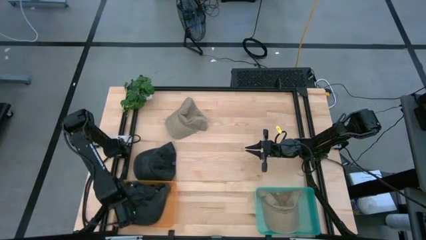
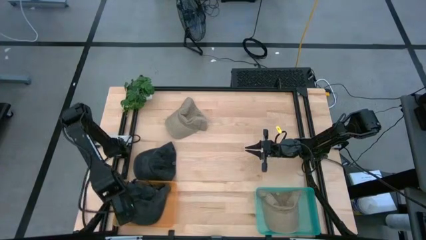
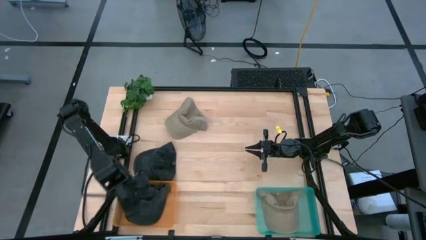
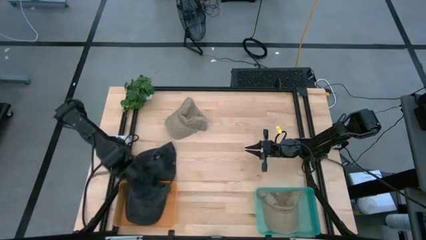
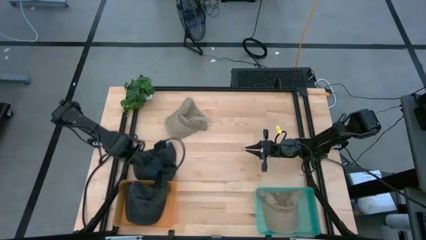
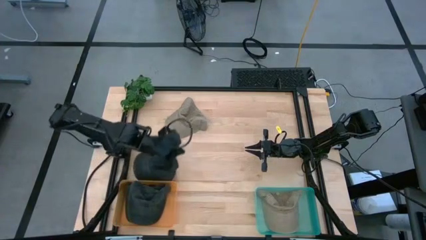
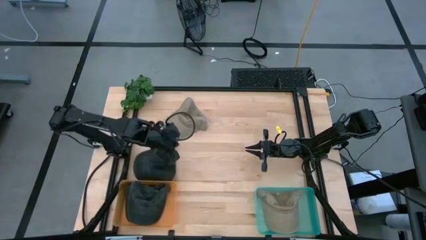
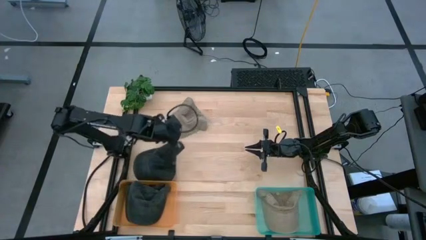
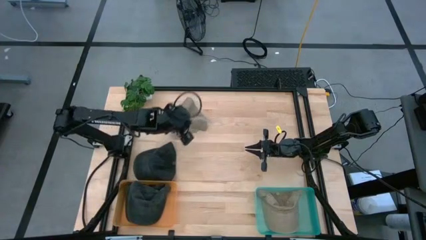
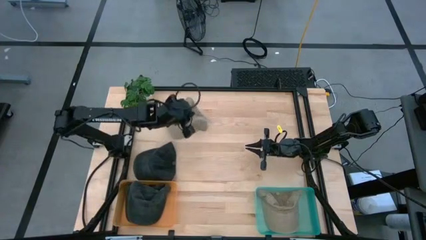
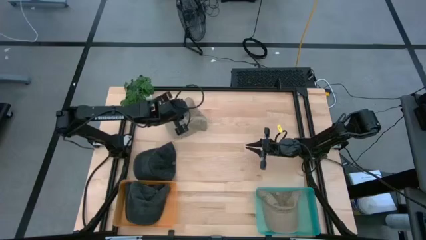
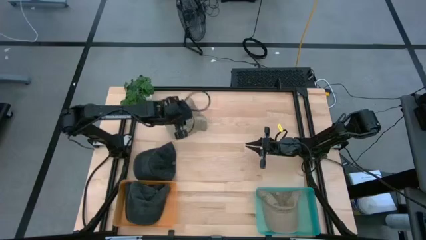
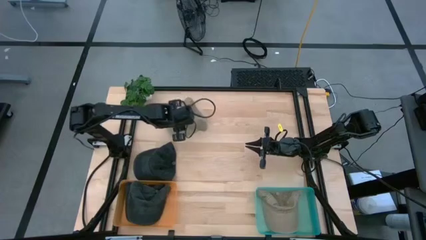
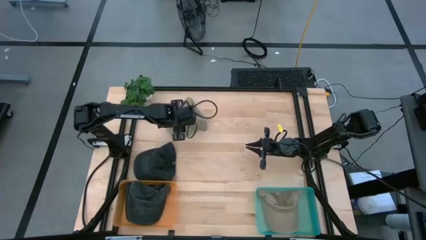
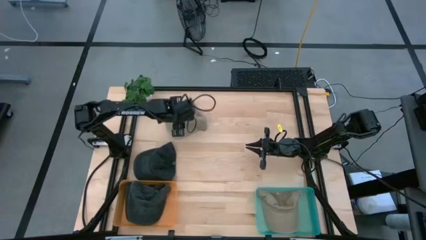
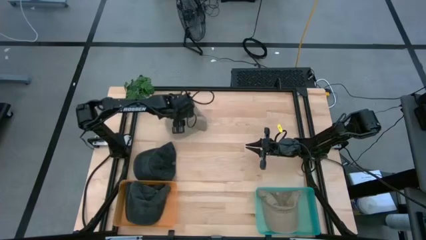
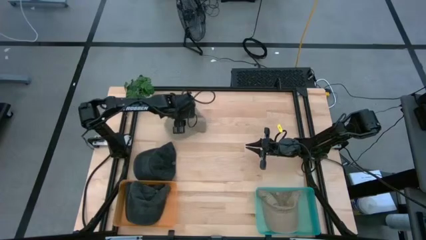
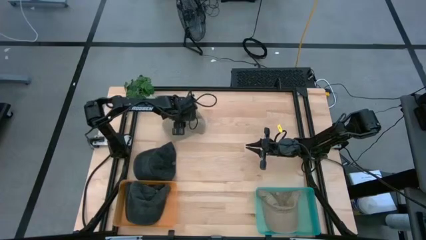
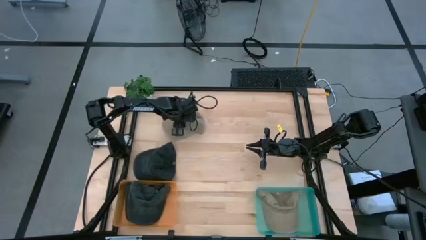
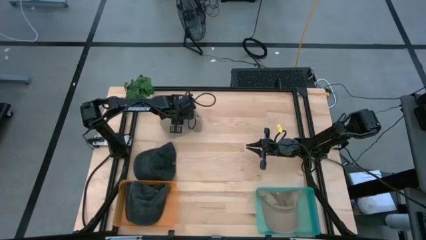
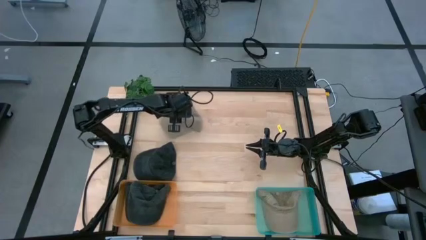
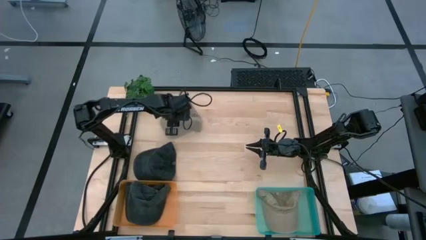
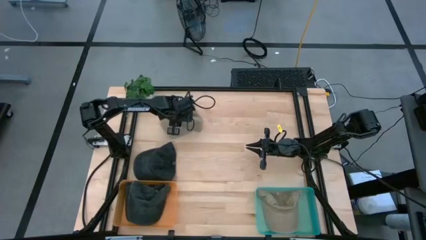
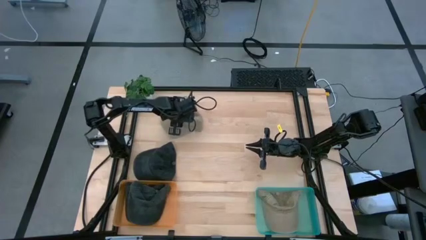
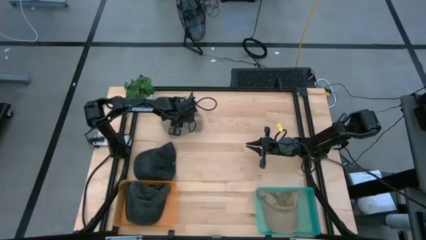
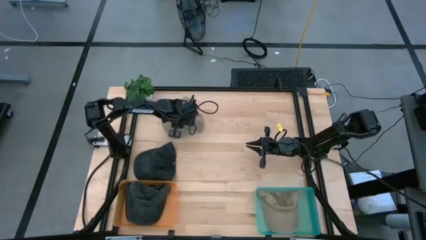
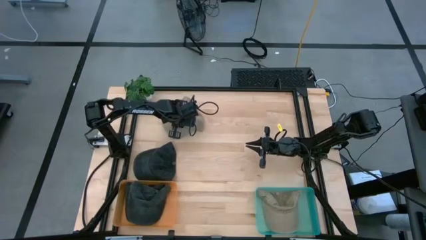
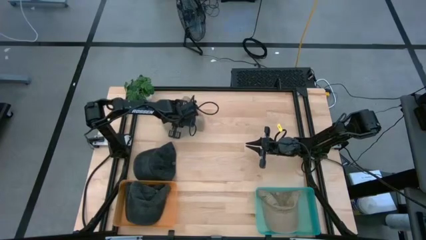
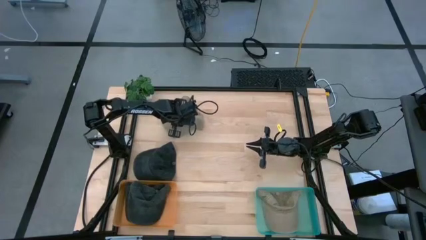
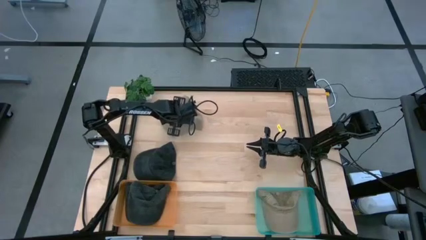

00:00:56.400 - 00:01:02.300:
Task: Pick & Place hat
Put the brown cap into the blue bin

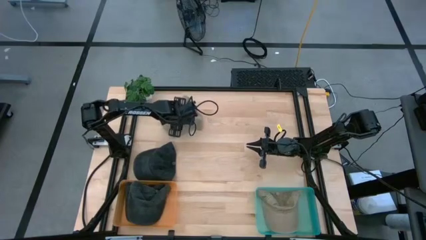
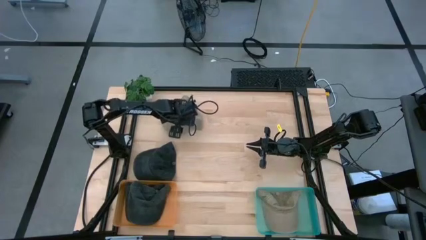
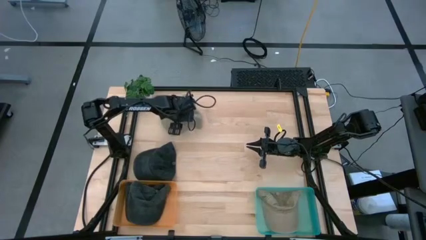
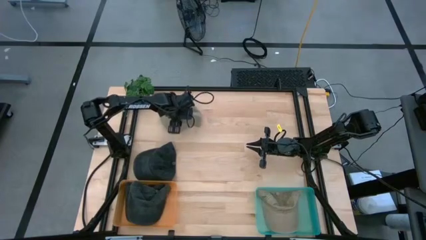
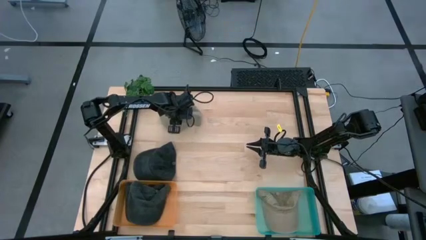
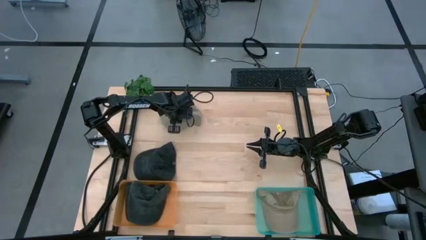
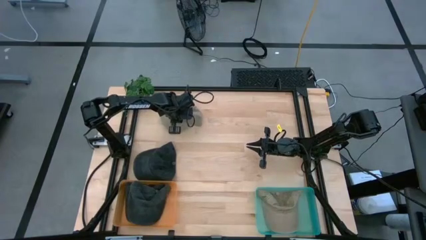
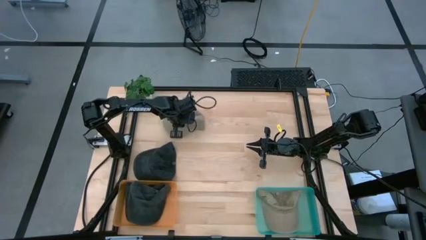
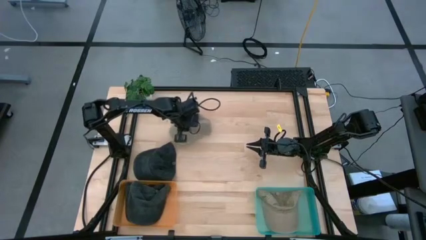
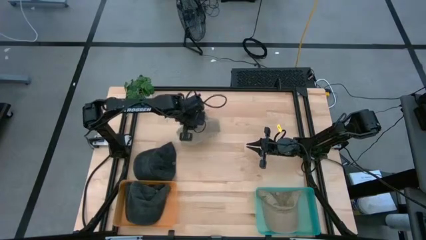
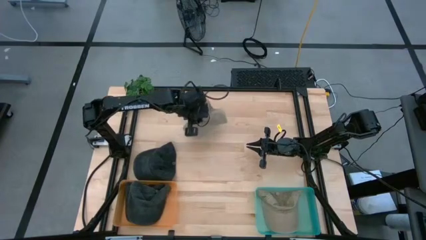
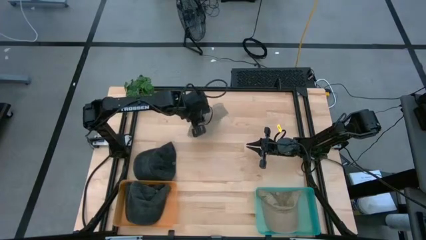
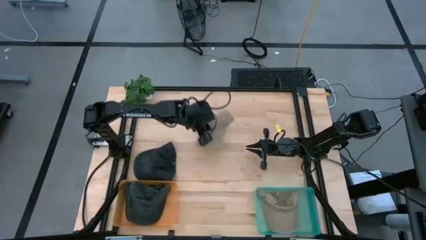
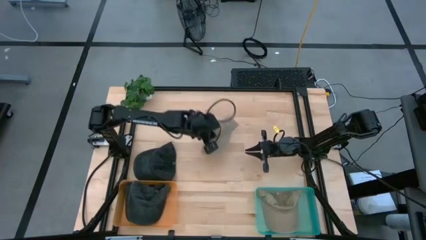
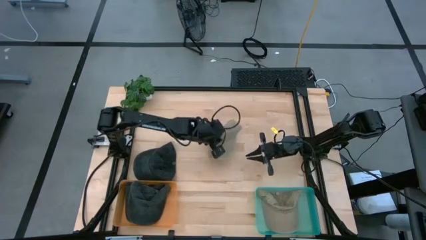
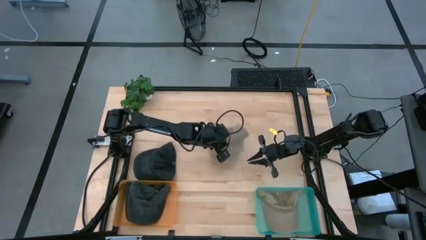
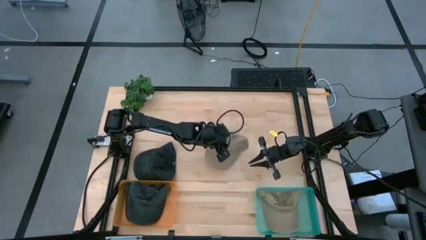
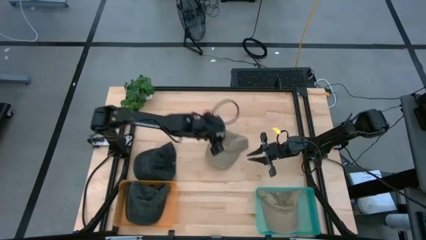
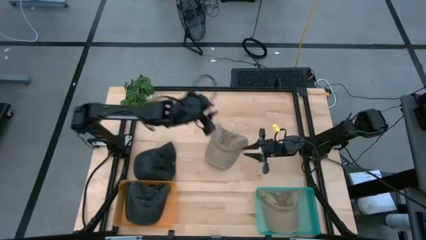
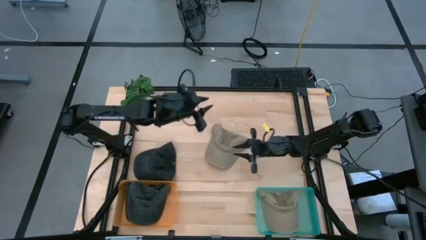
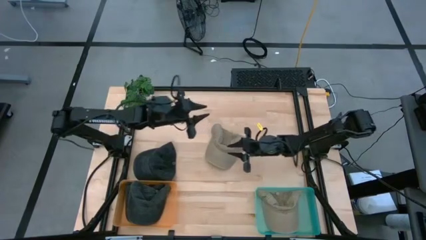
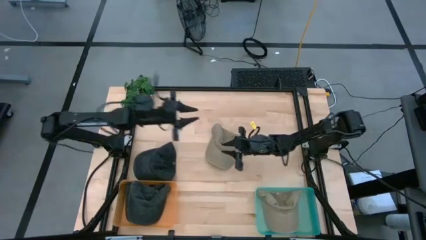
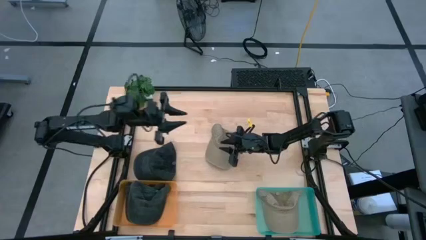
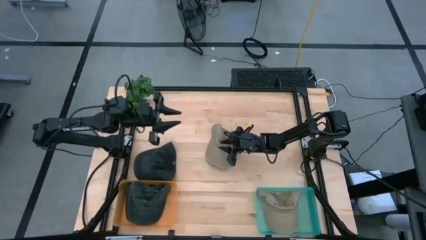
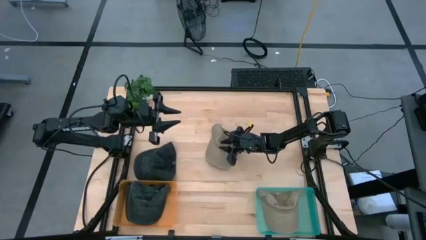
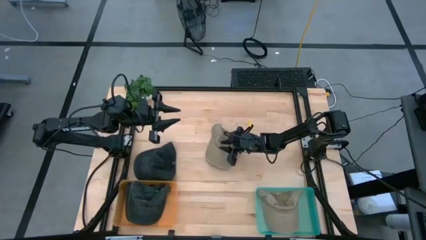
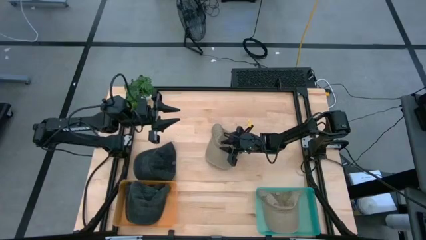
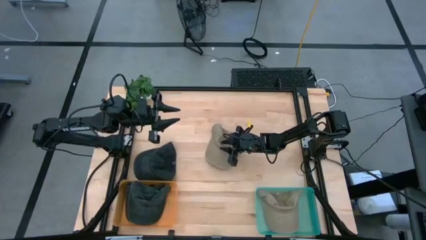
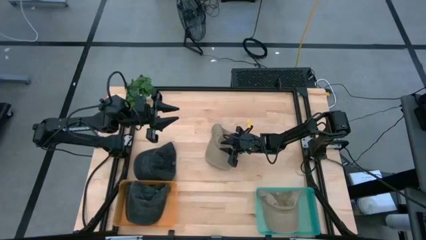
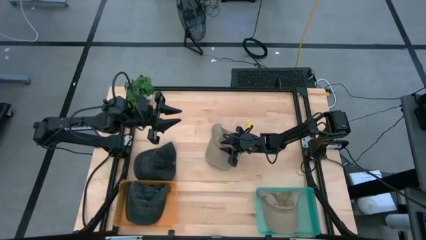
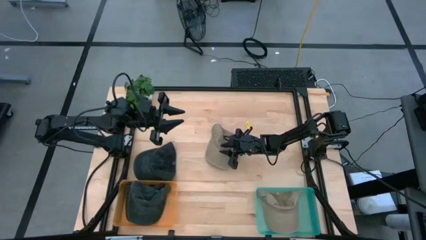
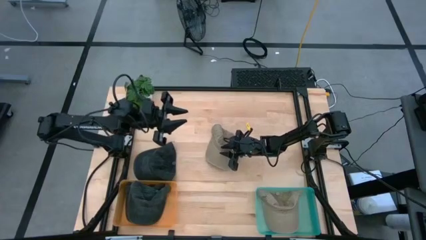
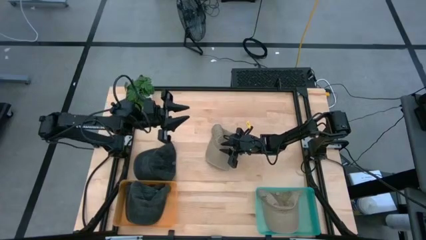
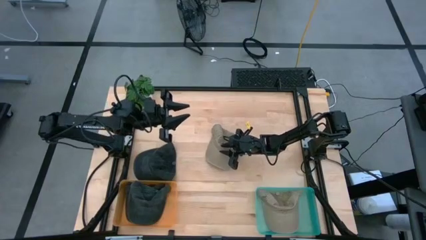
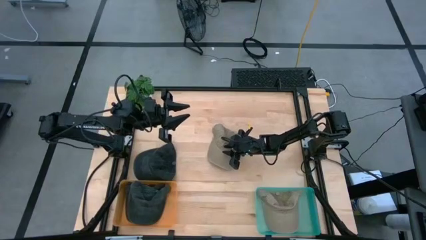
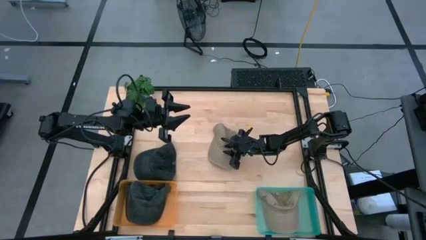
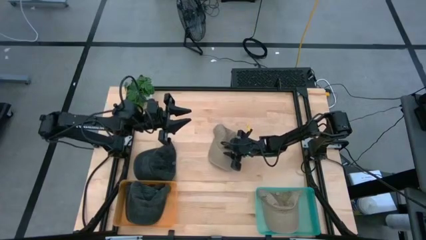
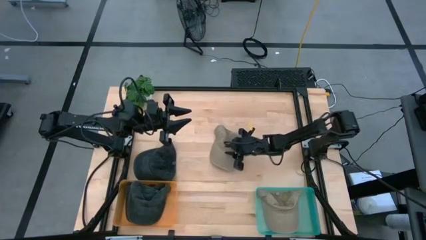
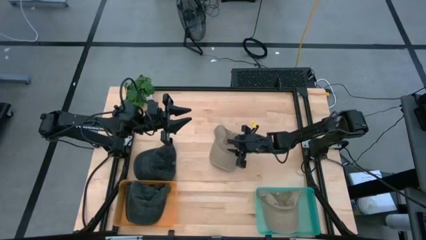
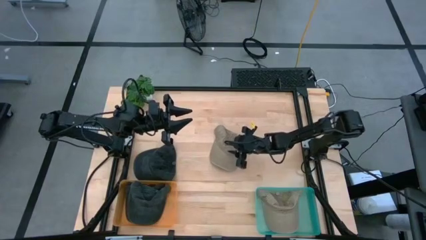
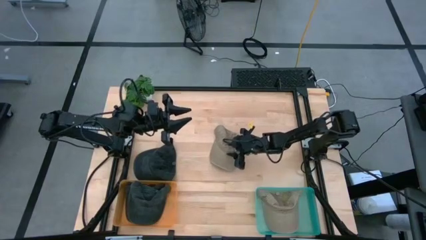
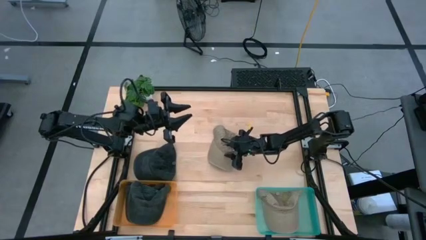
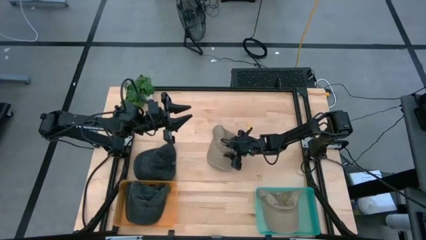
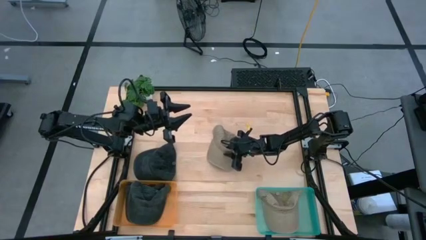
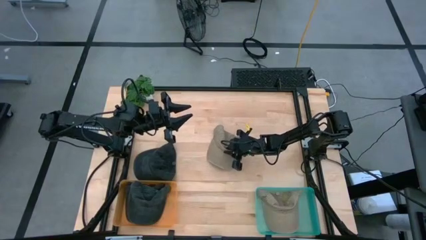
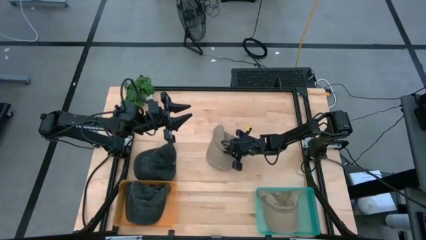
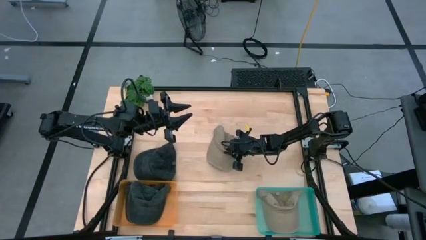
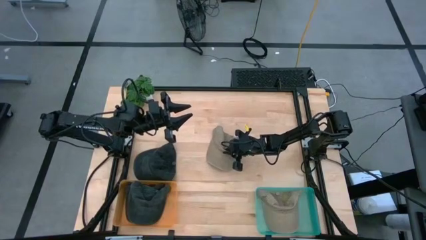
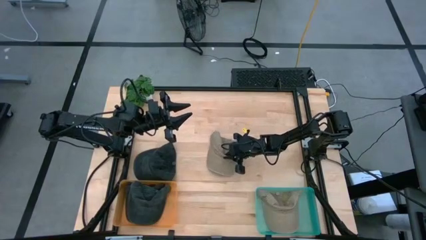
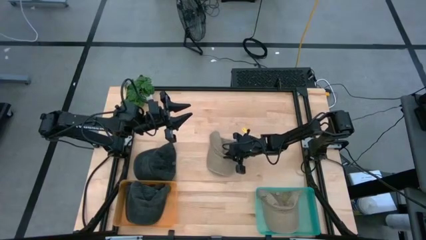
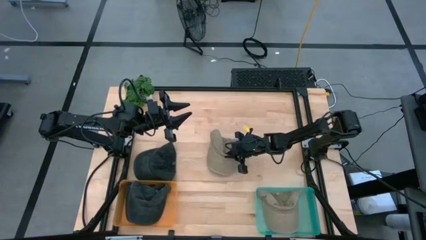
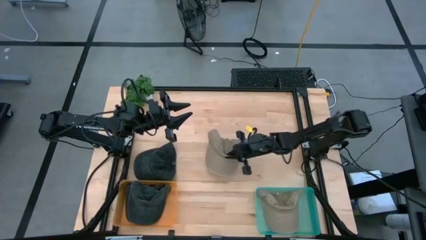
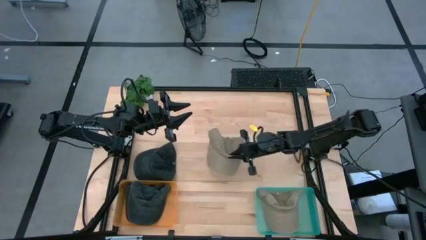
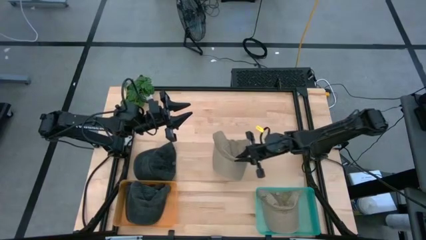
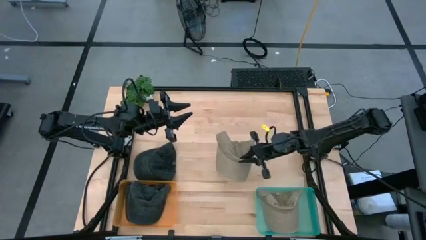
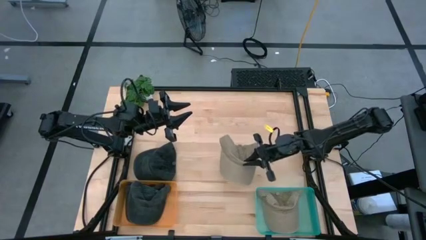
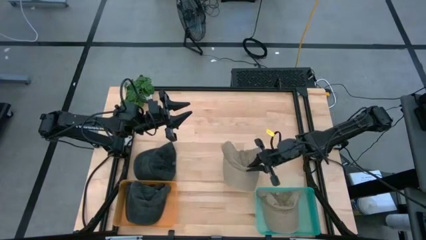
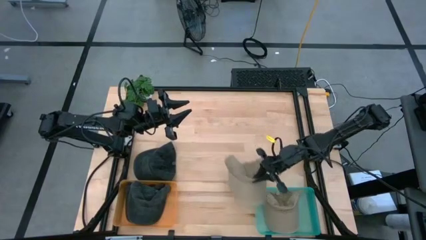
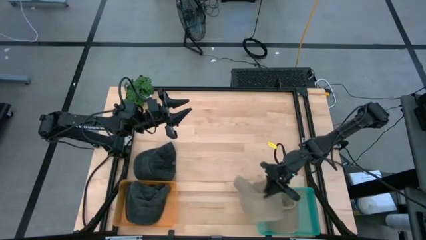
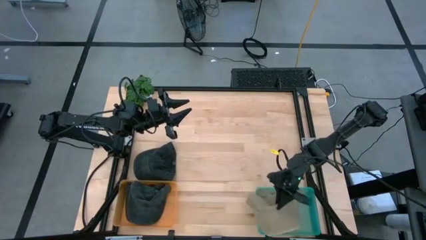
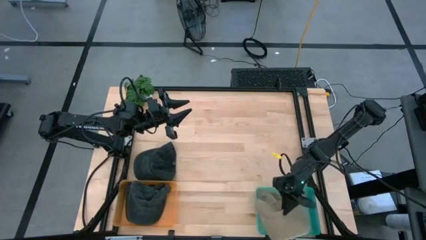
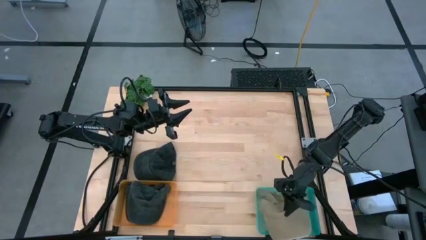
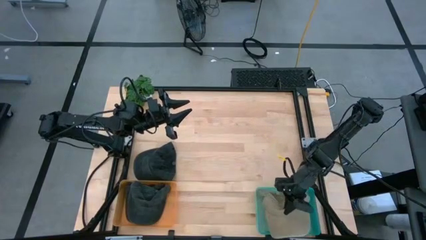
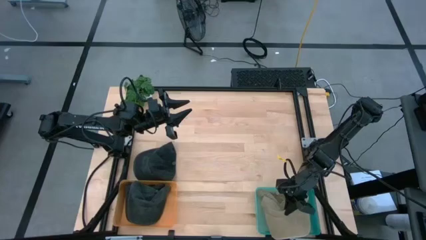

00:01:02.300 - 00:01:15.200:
Put the brown cap into the blue bin
